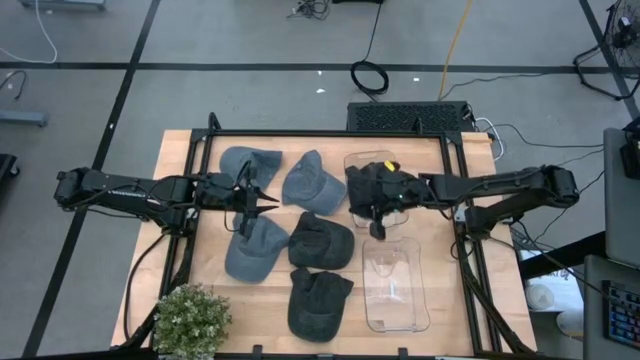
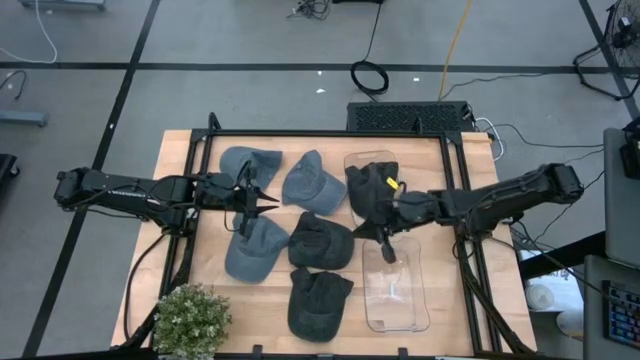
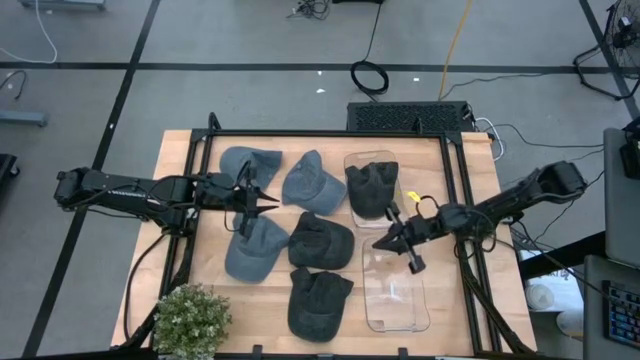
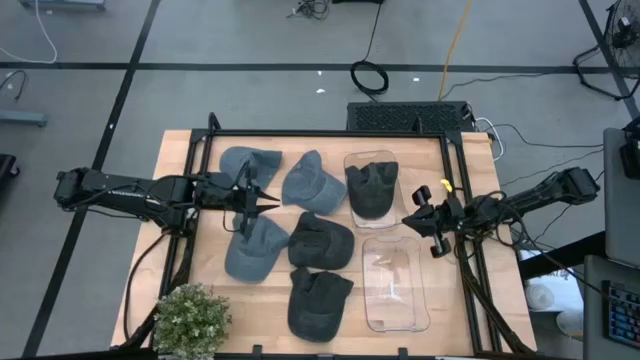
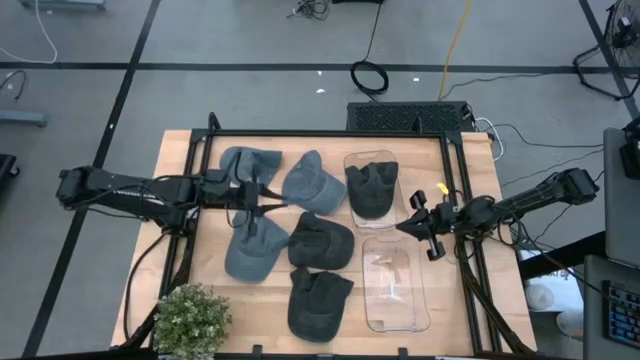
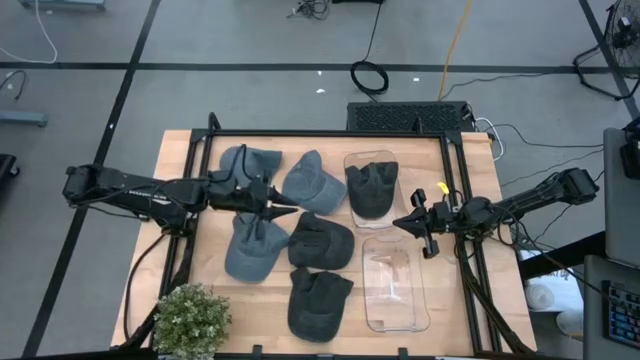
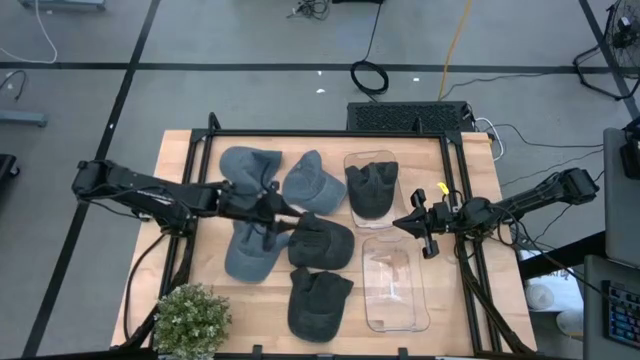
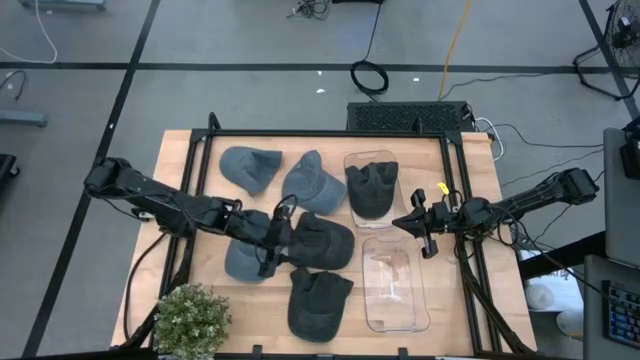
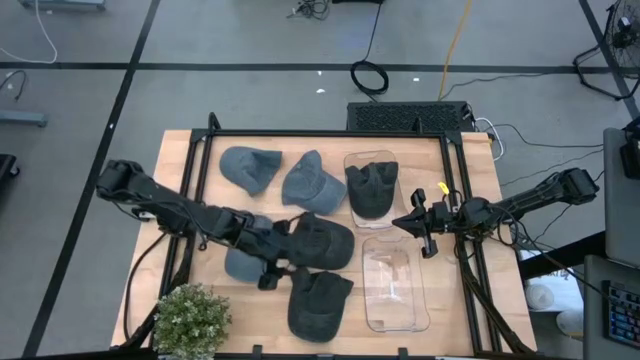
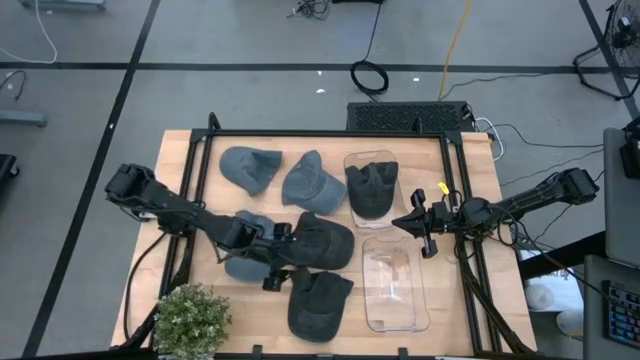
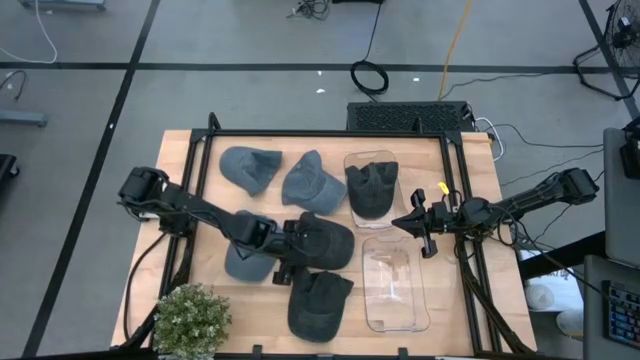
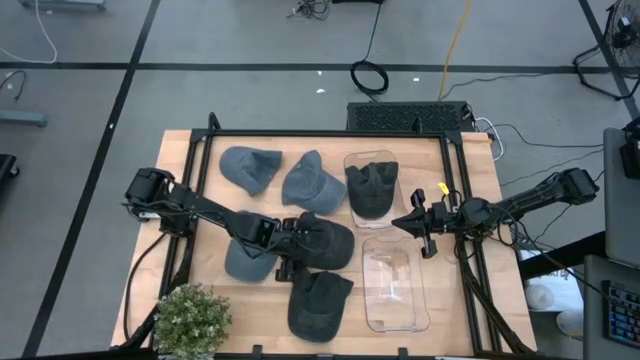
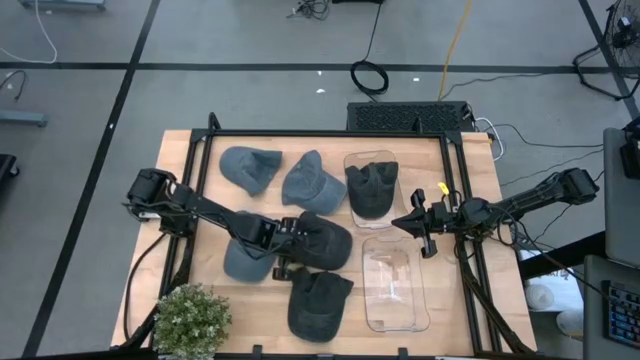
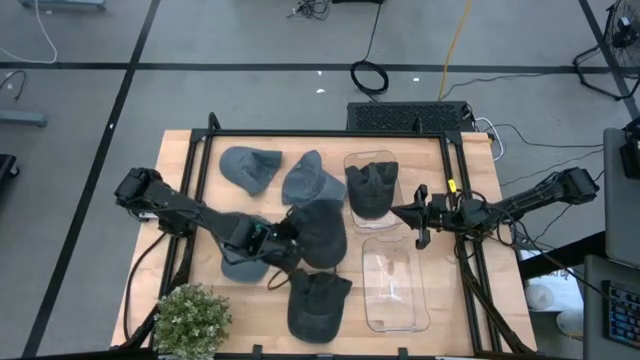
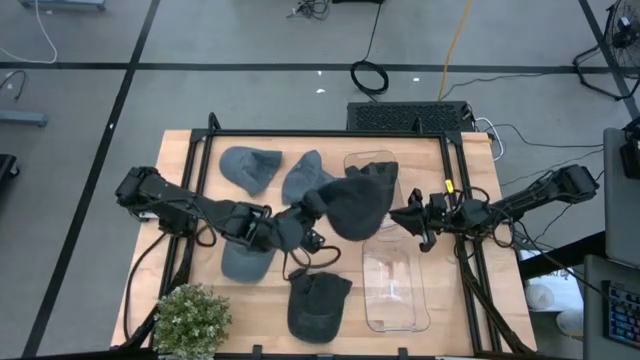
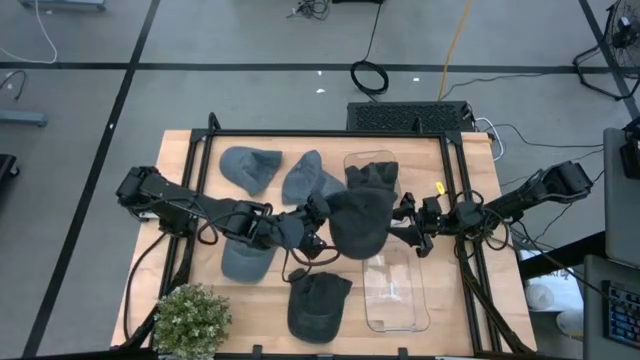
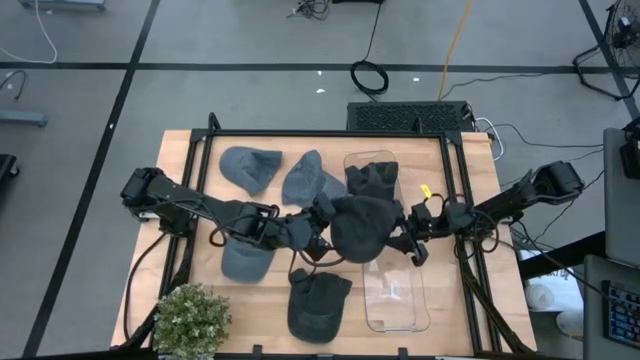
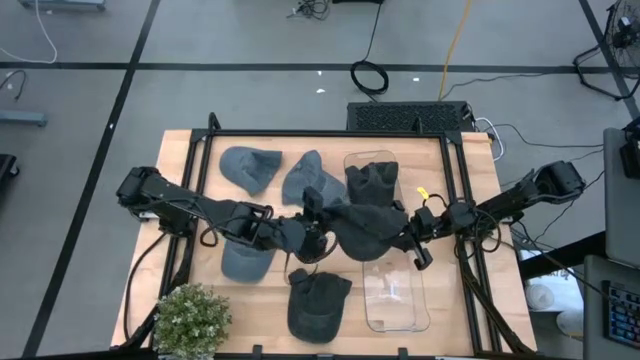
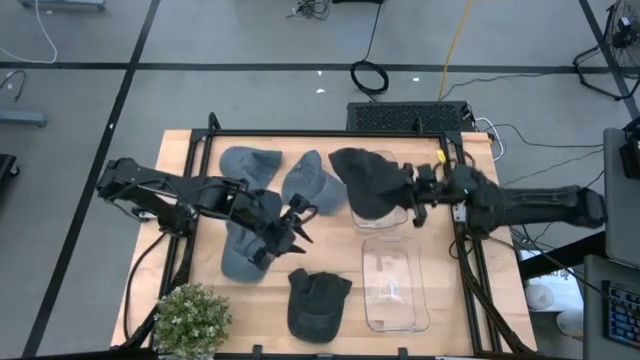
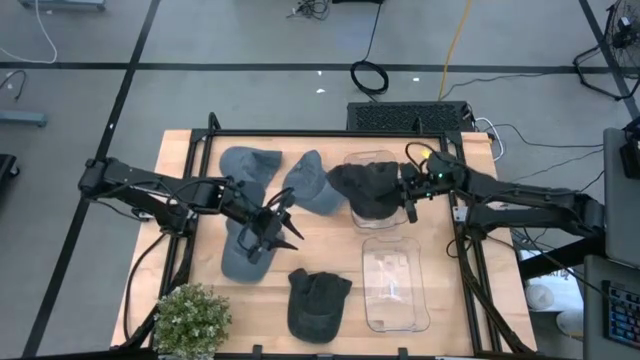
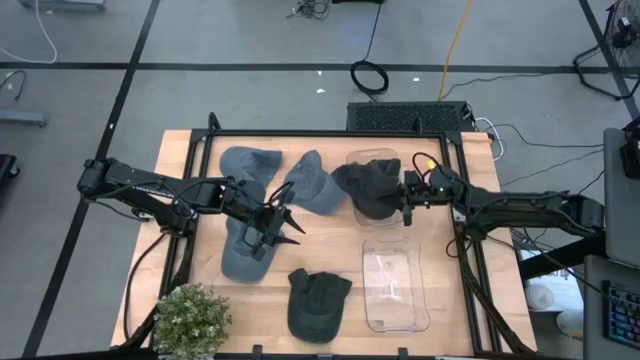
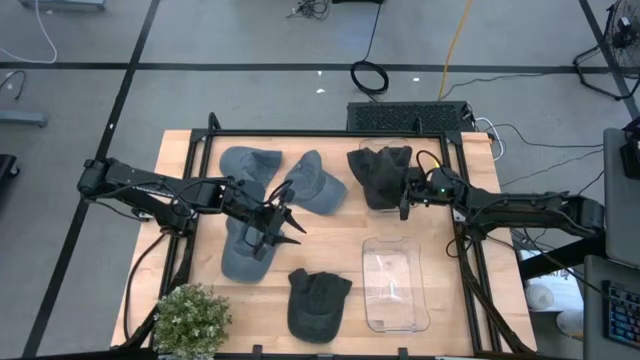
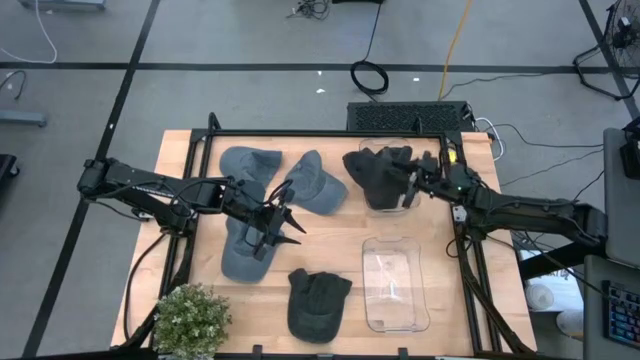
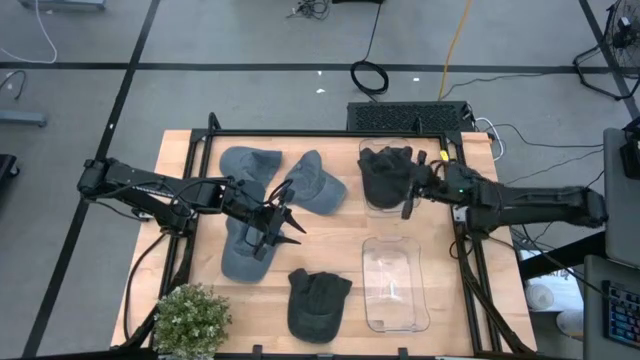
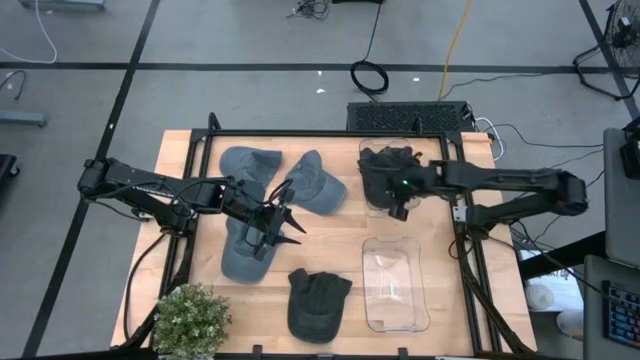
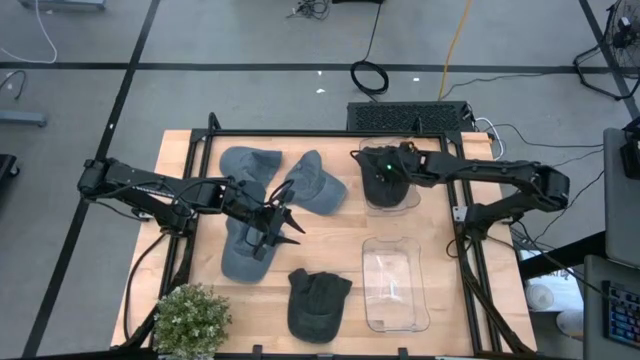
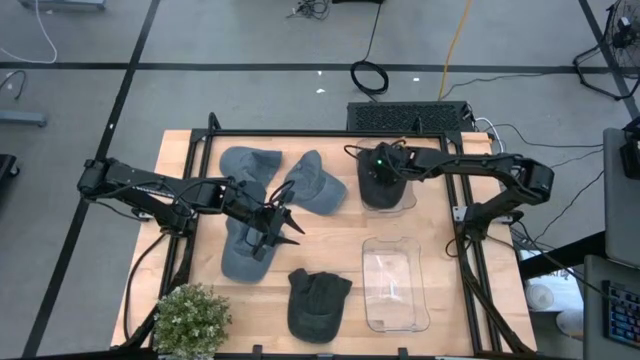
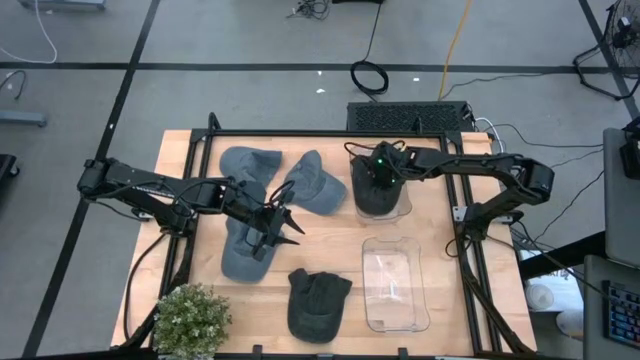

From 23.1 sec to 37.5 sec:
Task: Pick & Place hat
Put the top black cap into the top transparent bin

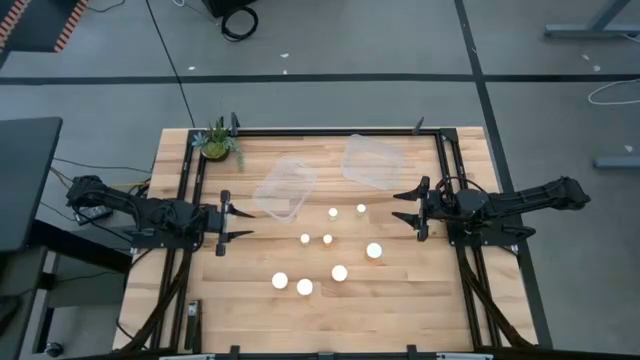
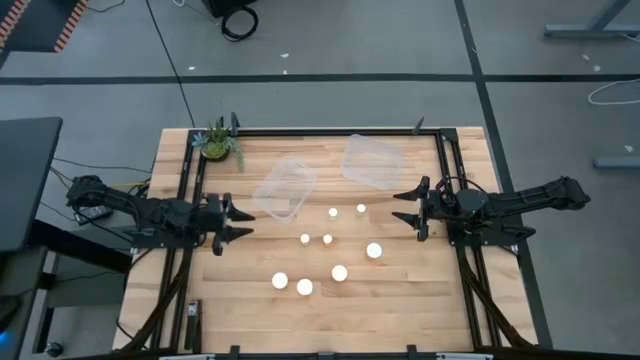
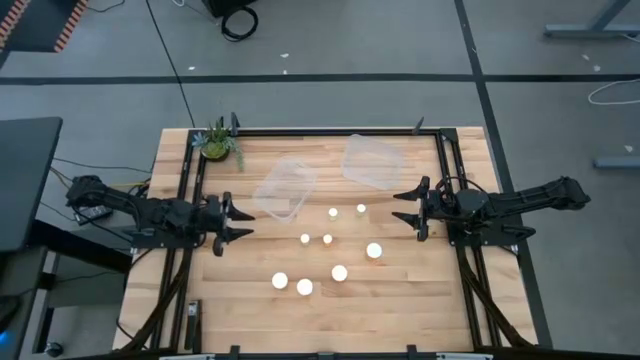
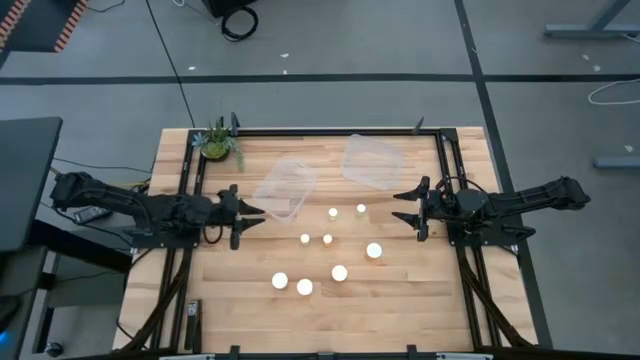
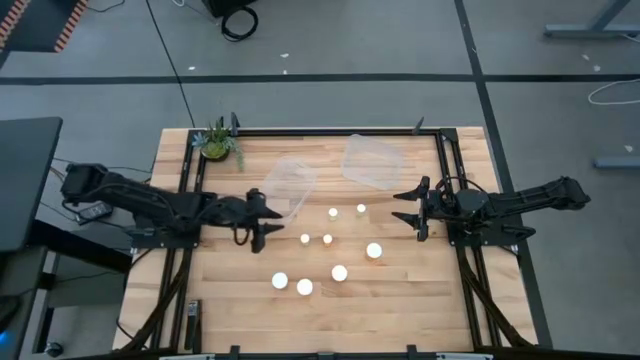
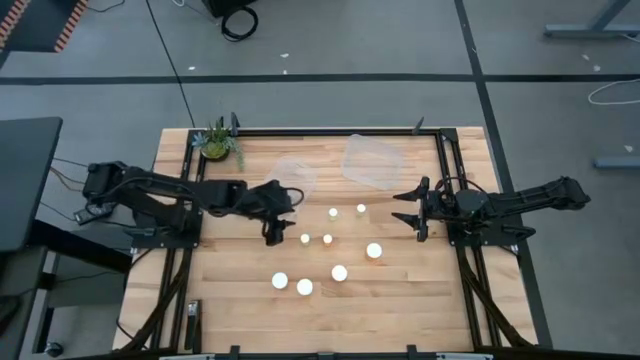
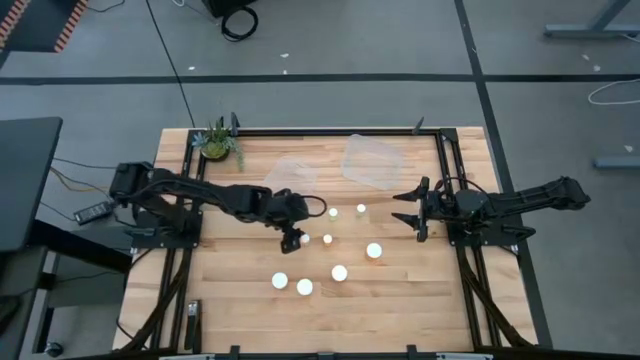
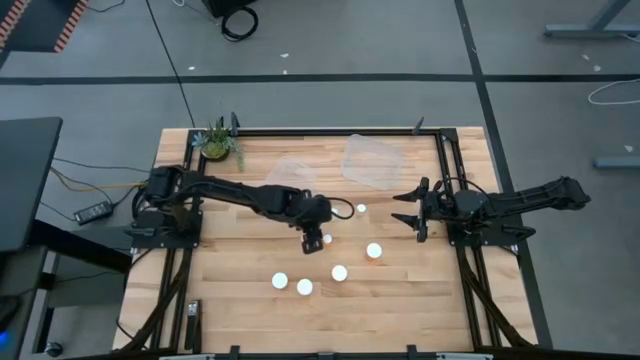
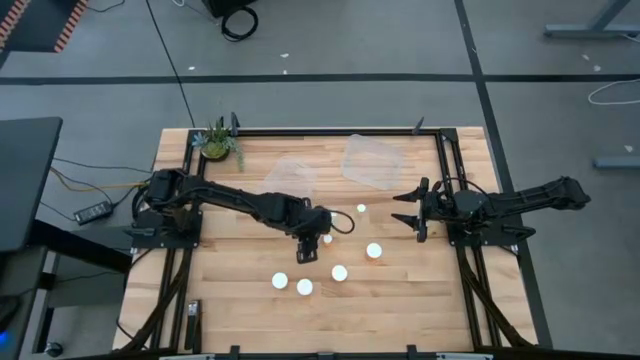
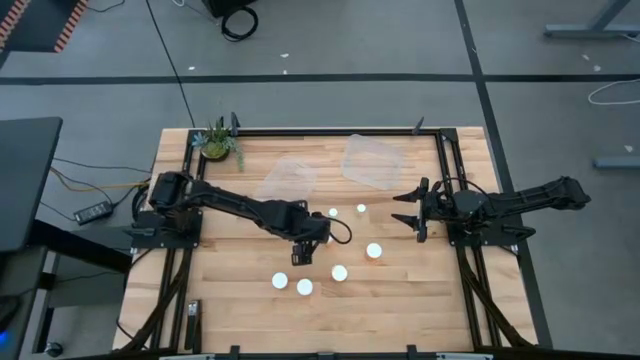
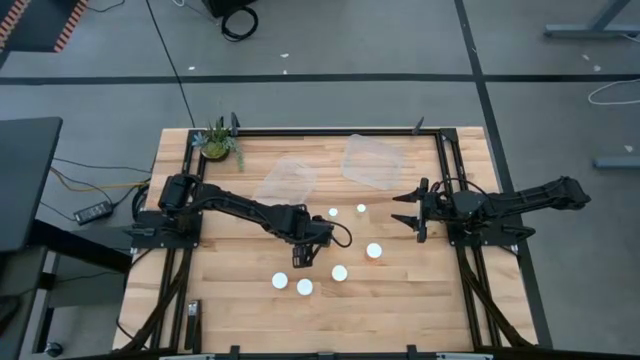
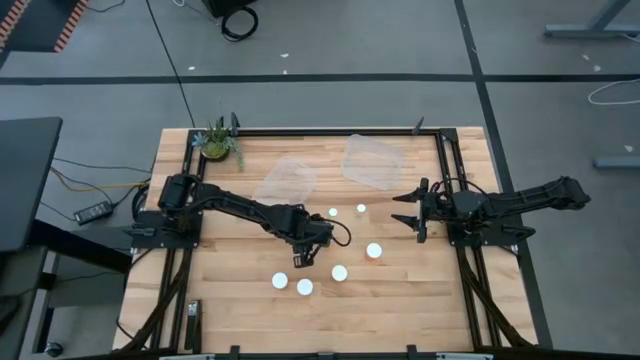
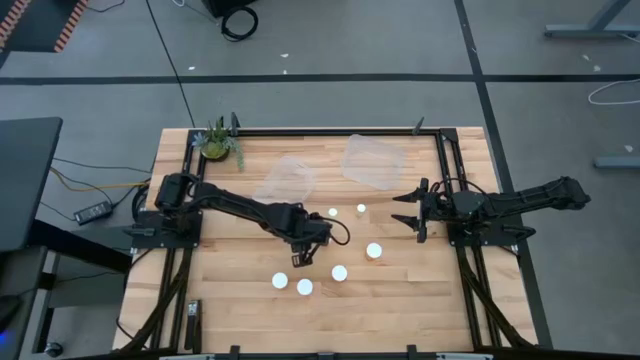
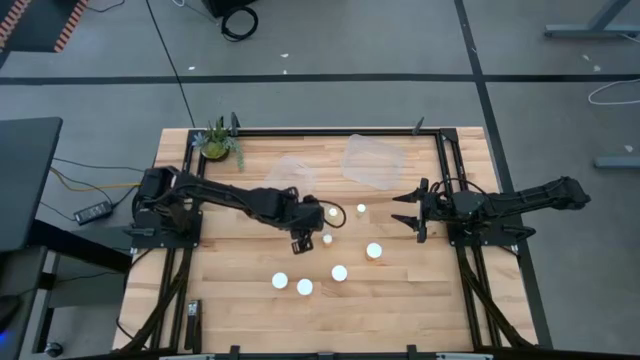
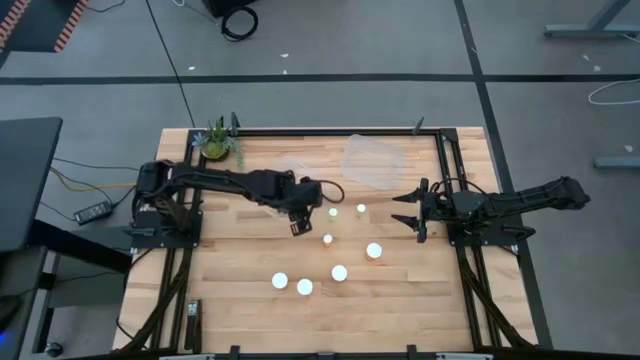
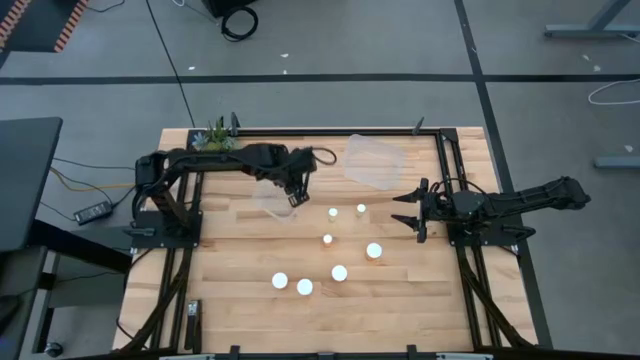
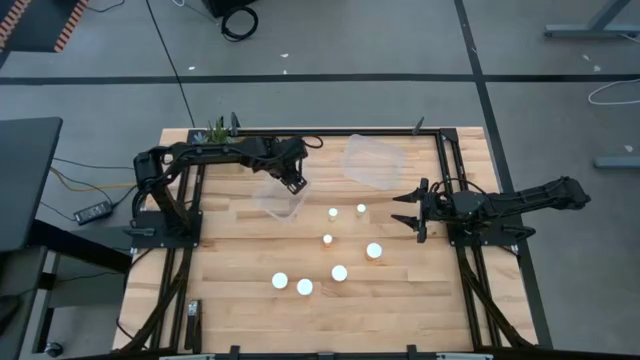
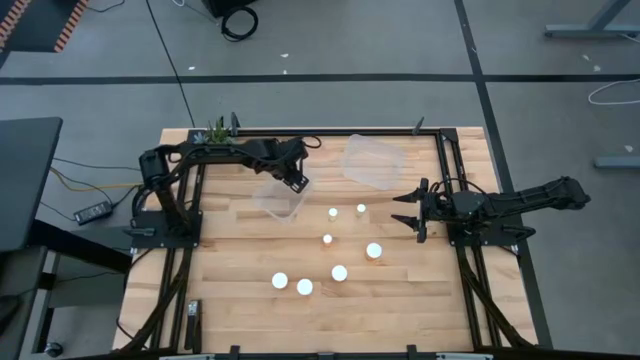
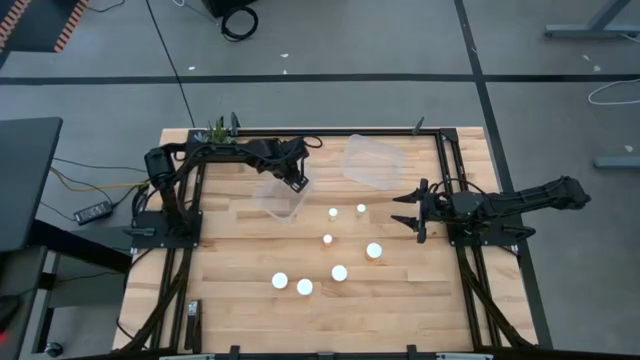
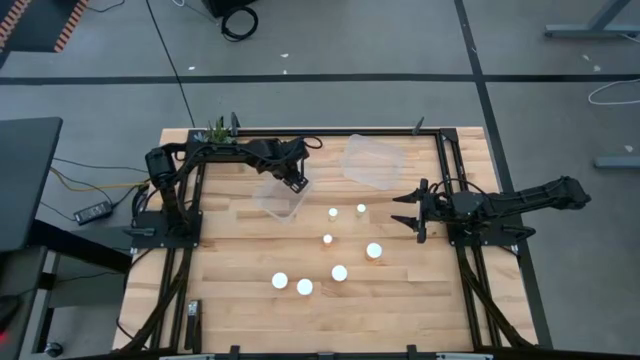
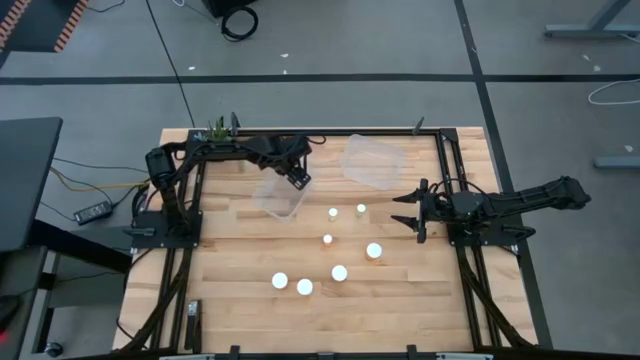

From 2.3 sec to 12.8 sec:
Task: Pick and place medicine bottles into bin by pill shape (circle, oval)
Put the small yellow pill bottle into the left transparent bin
